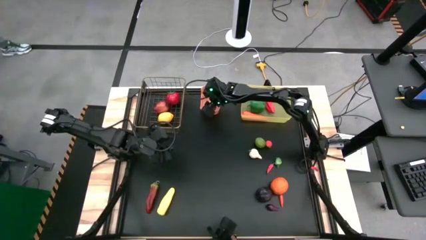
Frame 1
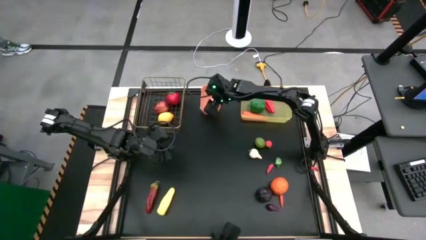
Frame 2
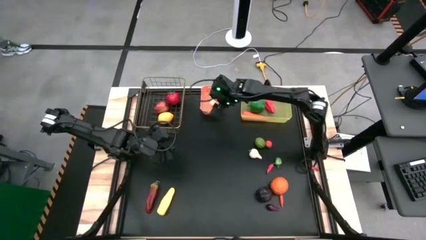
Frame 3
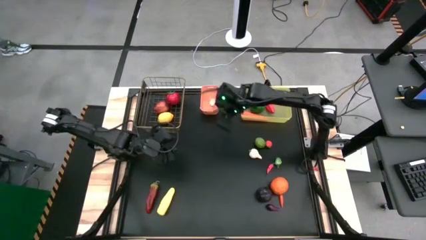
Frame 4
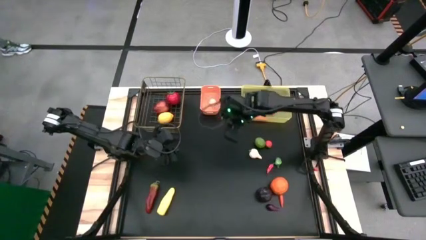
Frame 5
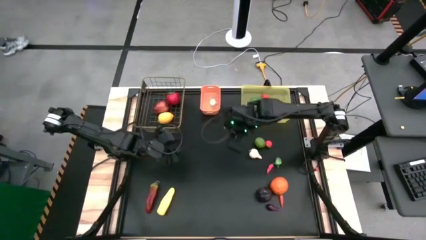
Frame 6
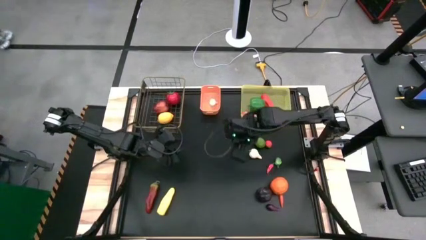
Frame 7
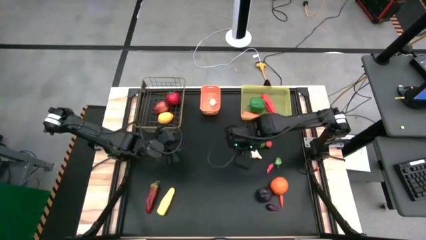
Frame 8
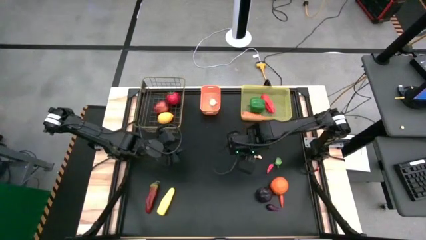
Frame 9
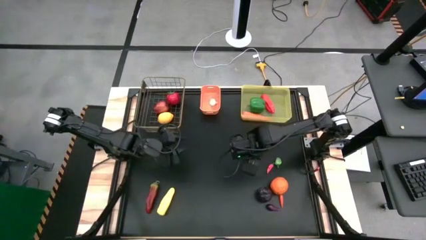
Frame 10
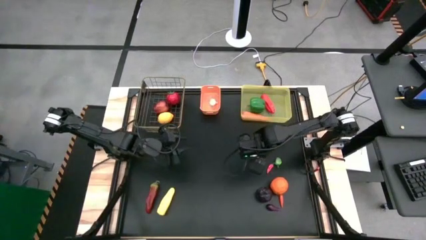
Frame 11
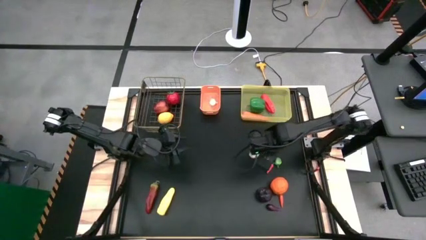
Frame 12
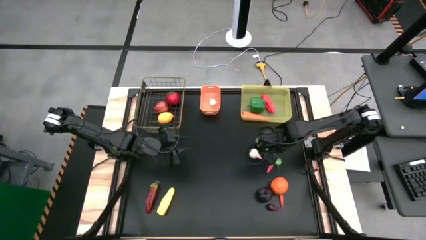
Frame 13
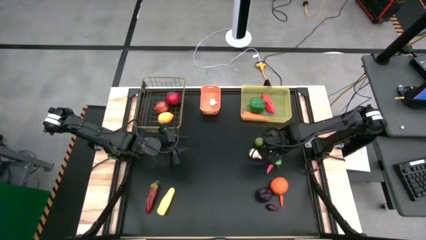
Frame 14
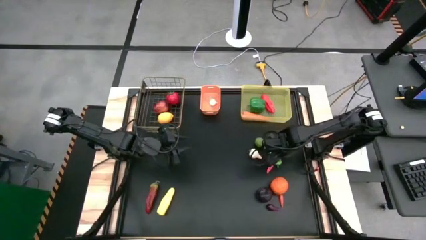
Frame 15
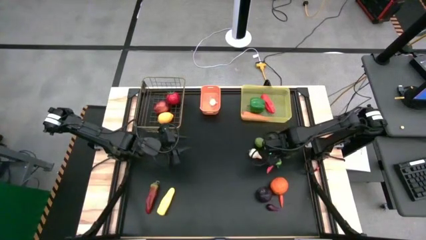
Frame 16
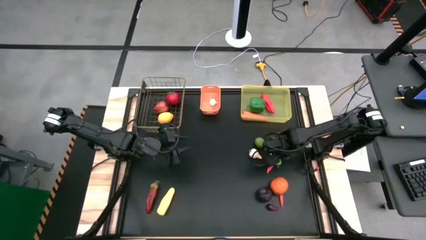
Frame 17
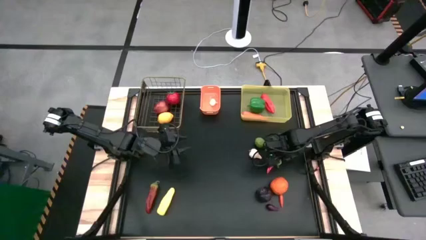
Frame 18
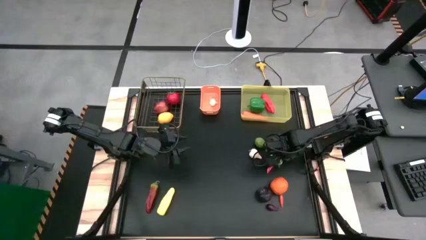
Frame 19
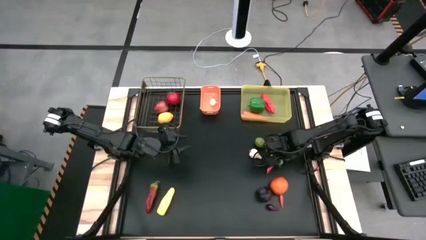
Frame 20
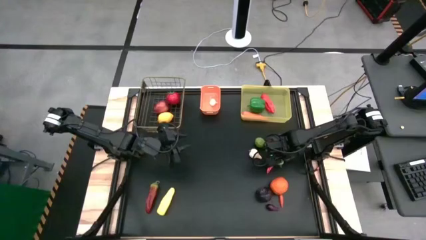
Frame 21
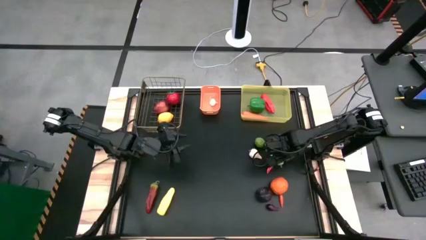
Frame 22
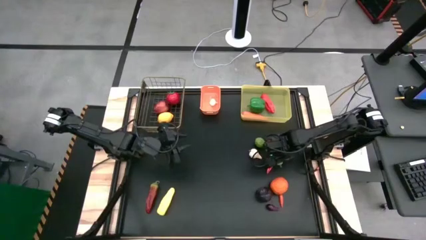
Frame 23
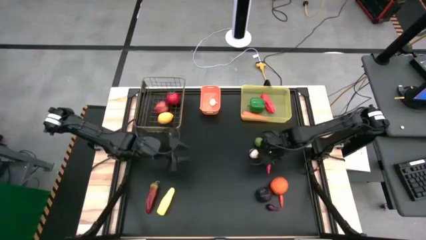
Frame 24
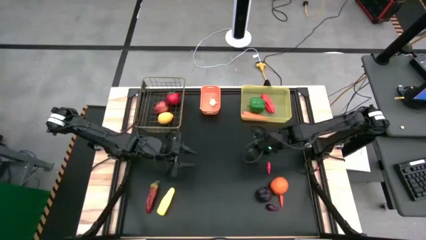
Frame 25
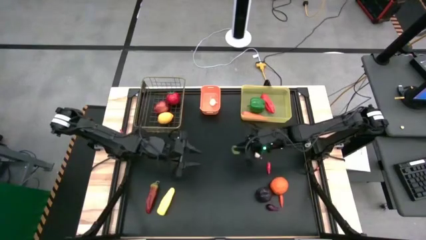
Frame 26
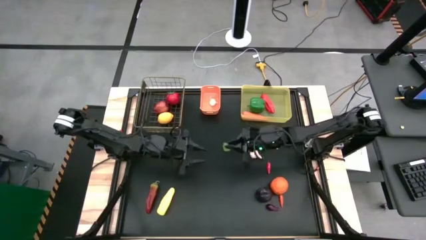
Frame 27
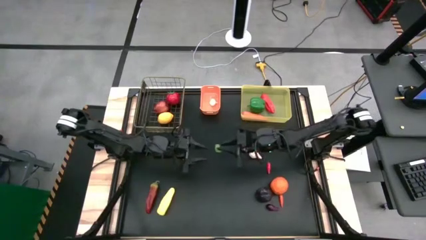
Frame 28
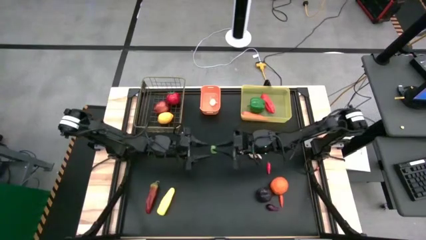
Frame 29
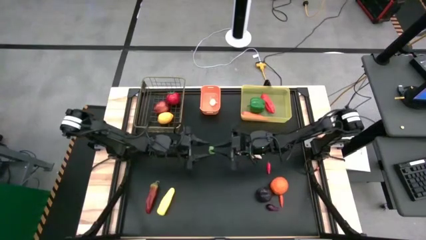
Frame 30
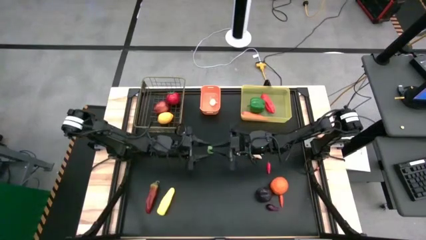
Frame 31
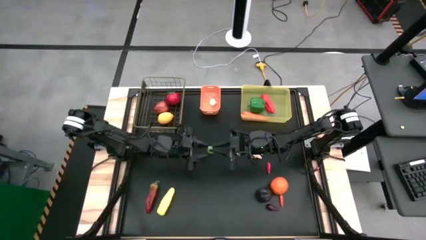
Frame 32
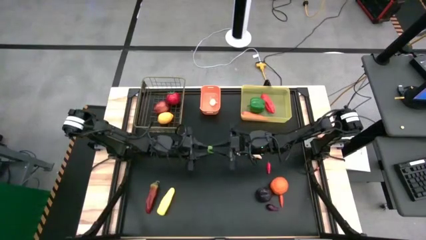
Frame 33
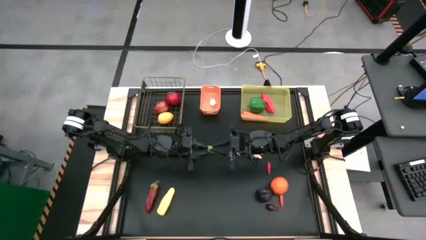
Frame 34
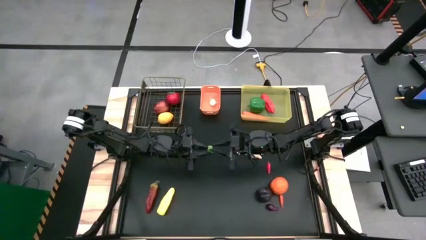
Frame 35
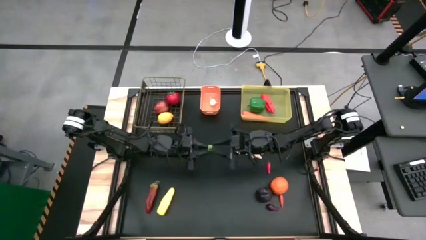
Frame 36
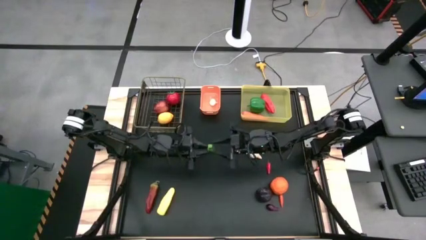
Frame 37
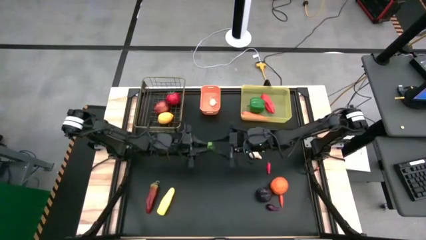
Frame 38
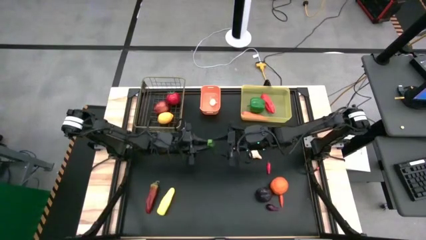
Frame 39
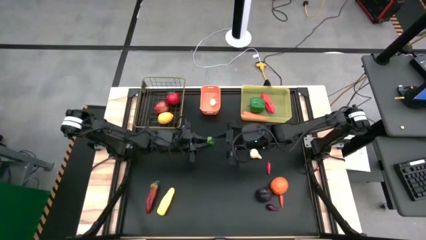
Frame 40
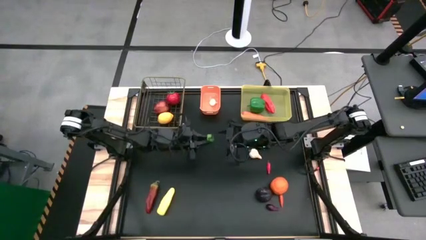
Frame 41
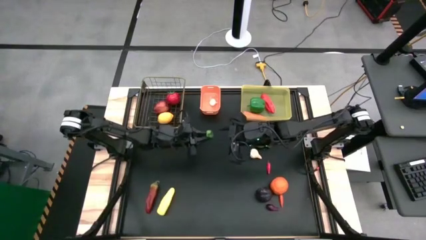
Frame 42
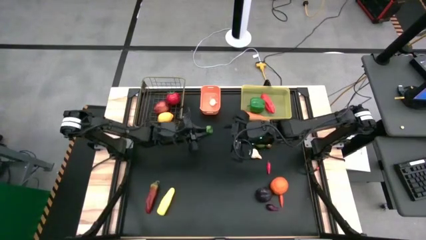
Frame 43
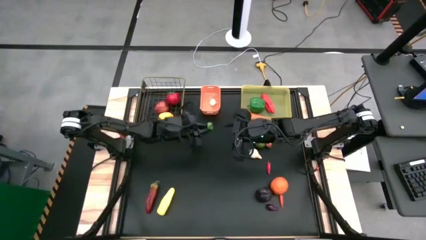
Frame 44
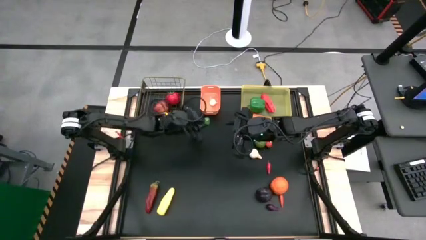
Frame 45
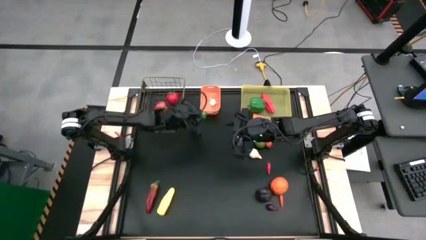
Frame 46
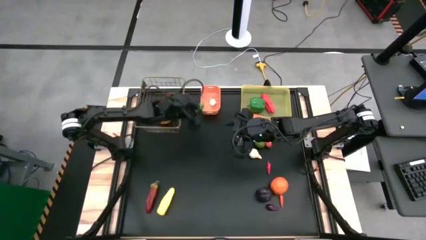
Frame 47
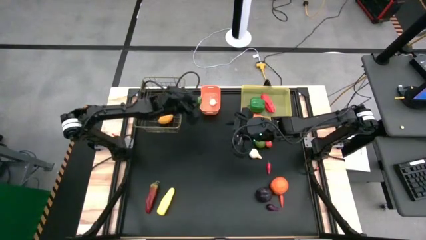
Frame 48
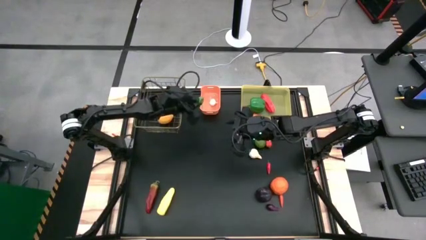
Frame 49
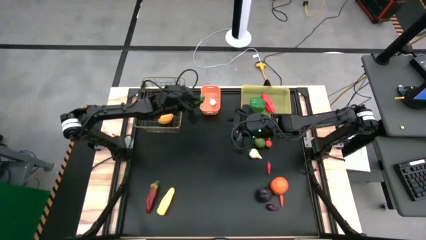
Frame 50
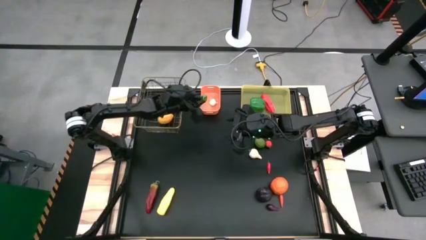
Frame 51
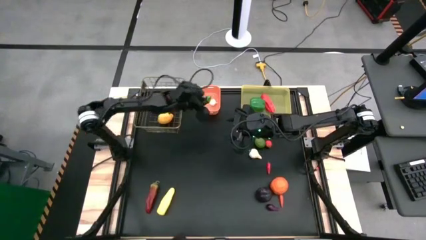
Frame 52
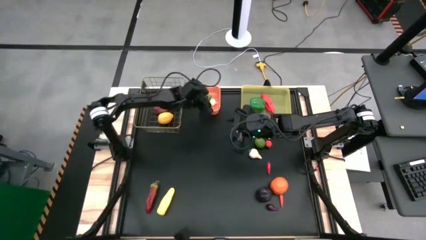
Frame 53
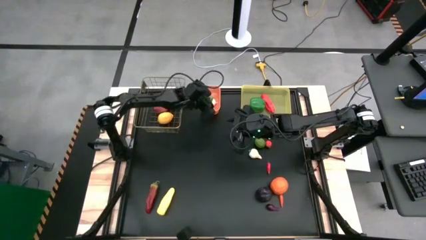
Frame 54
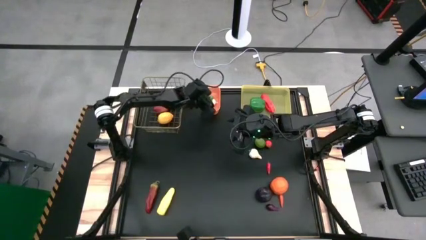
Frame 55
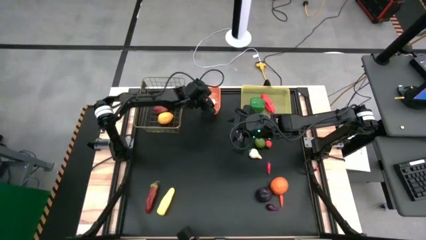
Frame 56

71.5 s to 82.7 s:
Task: Sort produce into baskets
Put the green chili pepper into the orange bin

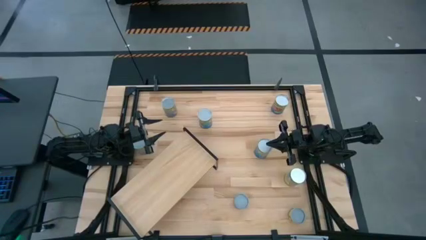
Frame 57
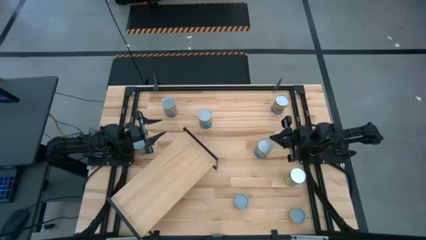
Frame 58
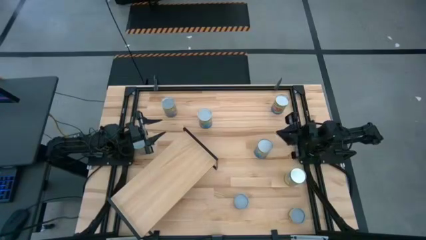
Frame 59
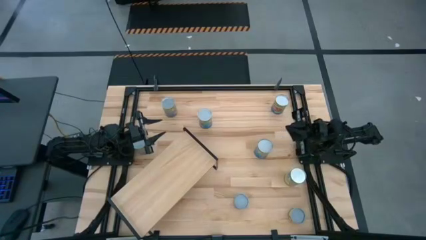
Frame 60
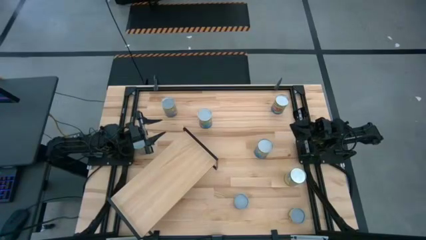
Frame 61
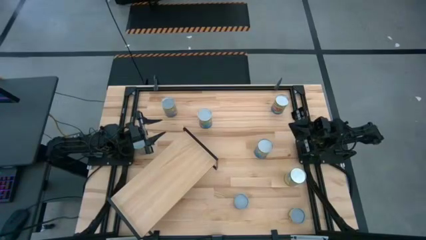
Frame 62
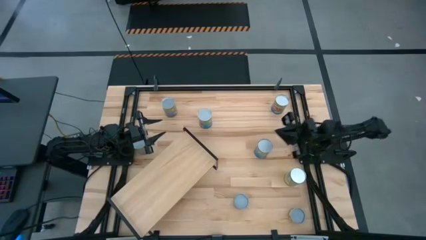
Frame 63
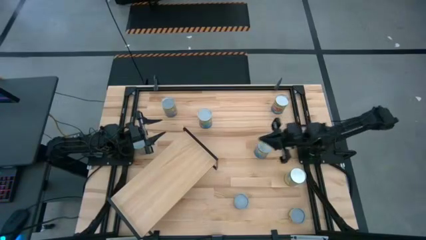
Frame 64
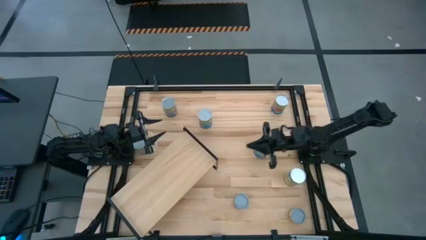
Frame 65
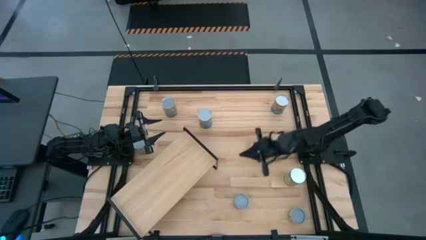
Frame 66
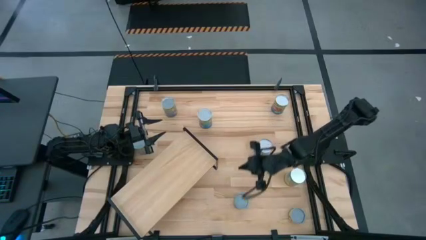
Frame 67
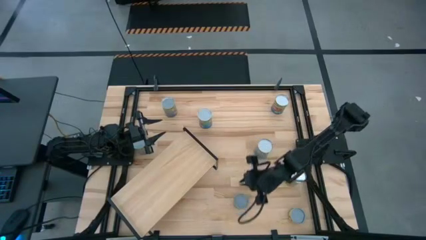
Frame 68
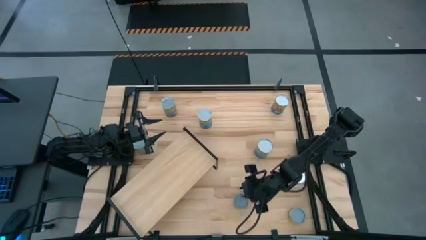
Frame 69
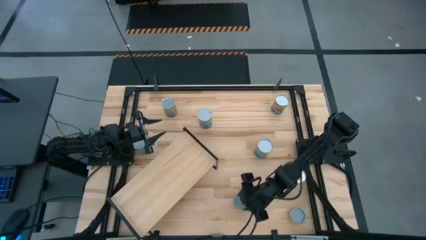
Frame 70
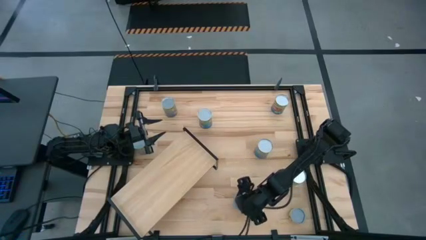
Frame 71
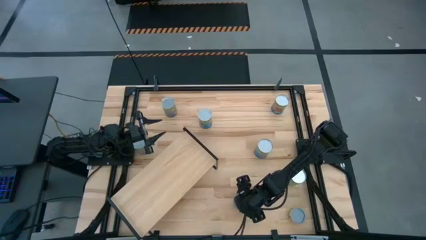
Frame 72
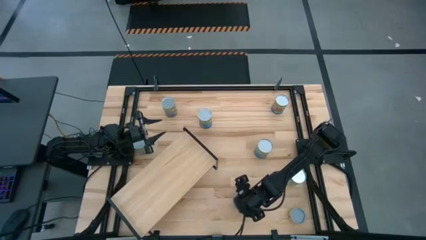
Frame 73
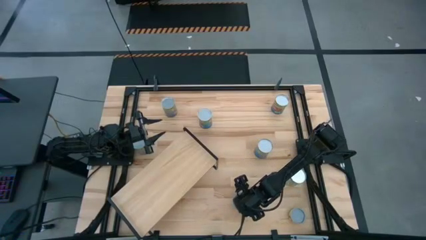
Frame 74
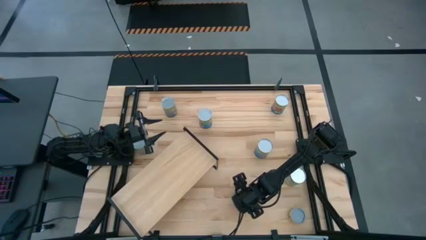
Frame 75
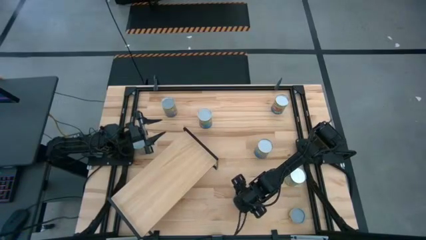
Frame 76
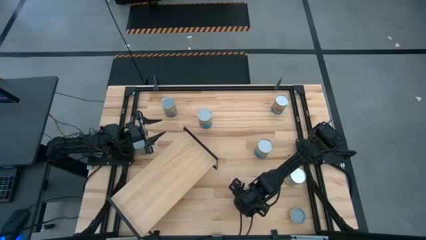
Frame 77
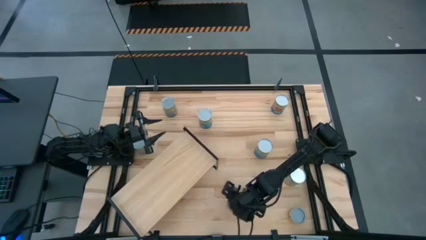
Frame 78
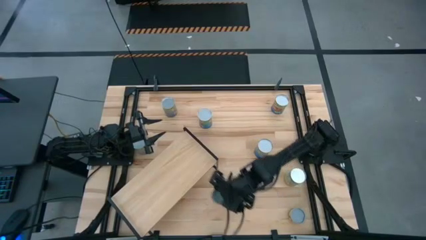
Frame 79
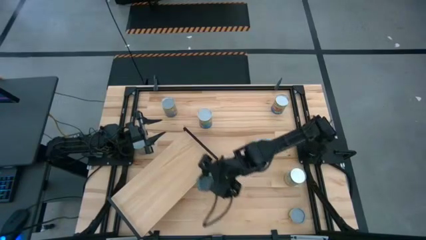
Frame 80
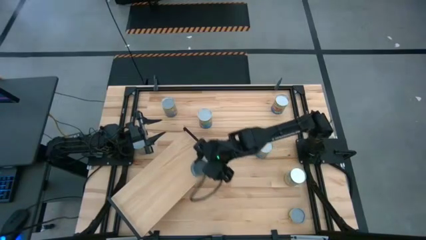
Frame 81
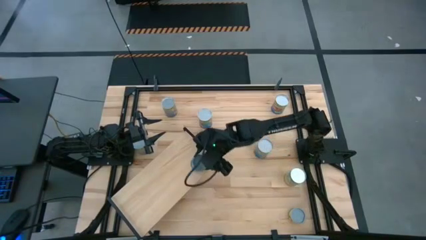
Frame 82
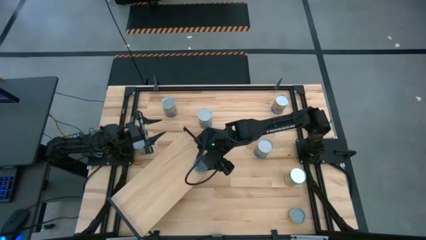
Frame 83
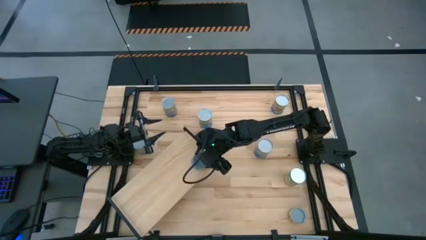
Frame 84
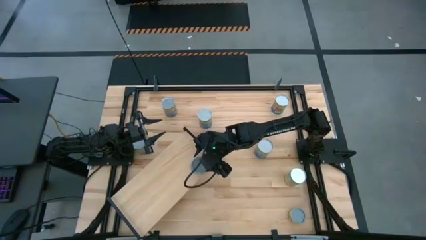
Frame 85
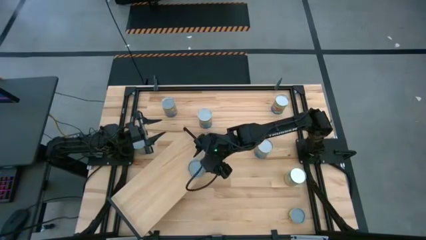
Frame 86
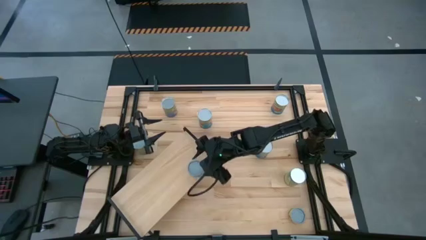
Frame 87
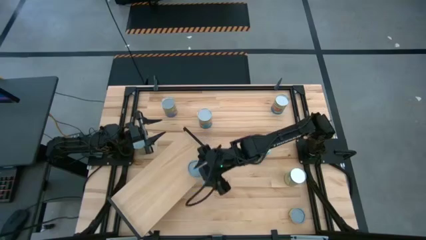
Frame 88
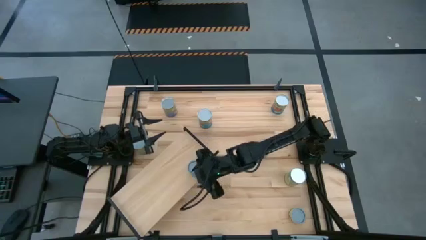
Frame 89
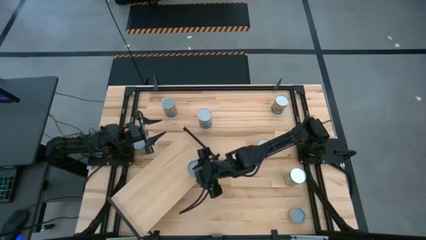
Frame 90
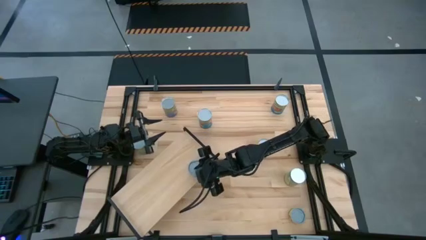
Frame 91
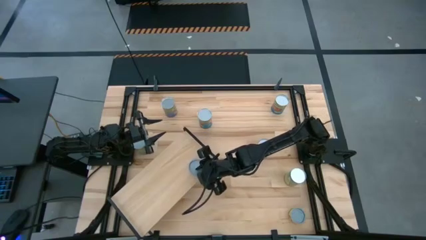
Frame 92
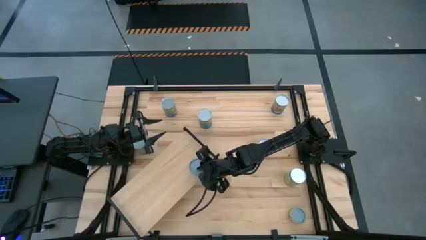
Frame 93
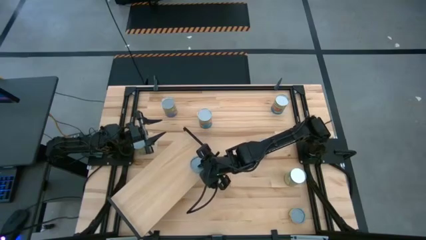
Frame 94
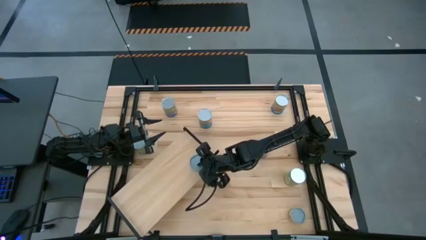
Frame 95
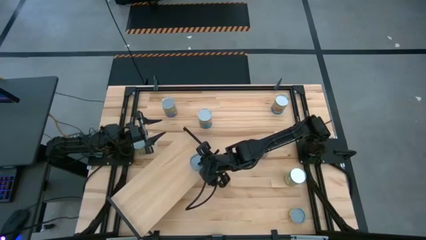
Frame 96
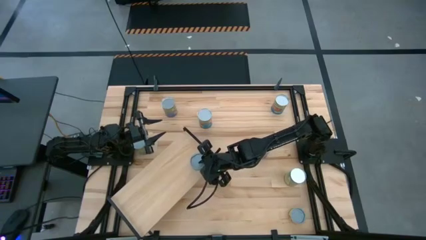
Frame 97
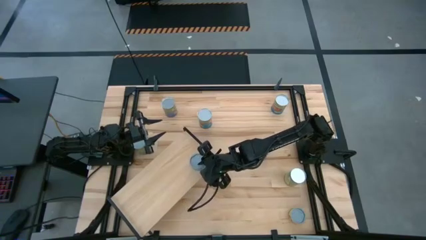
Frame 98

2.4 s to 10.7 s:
Task: Pick and place cans onto a shelf
Put the green canned tuna on the shelf
